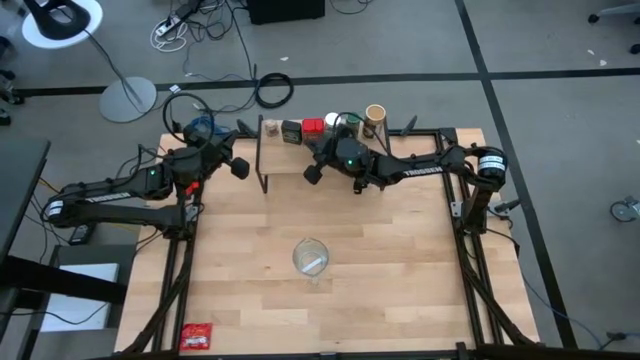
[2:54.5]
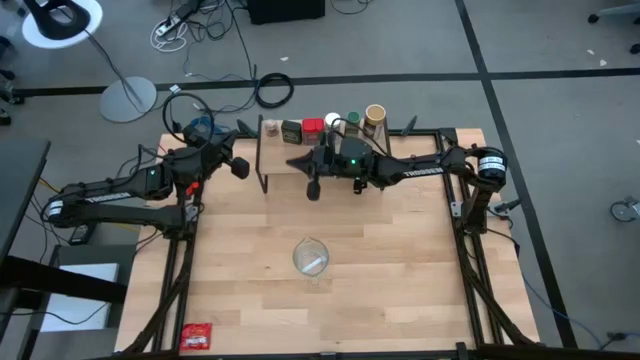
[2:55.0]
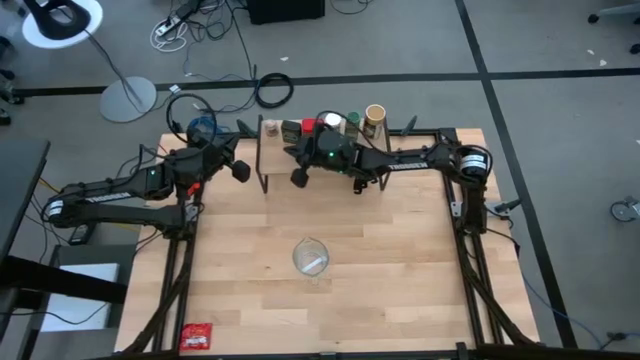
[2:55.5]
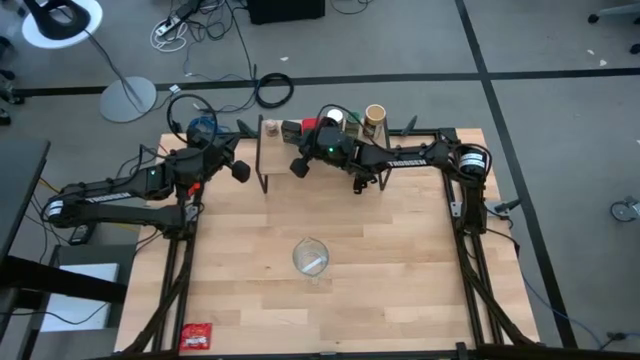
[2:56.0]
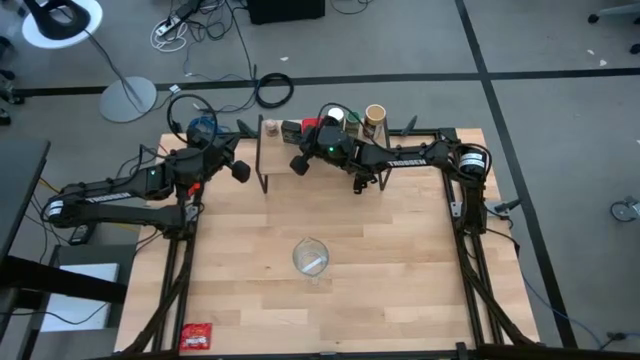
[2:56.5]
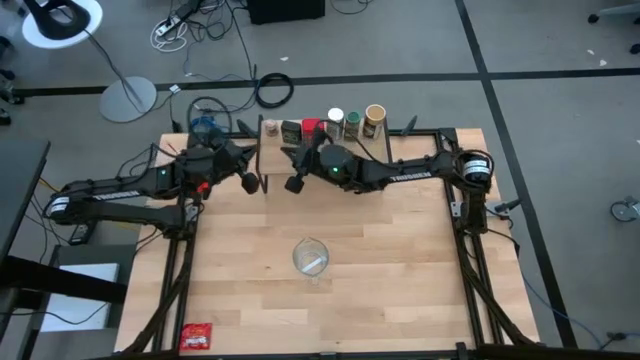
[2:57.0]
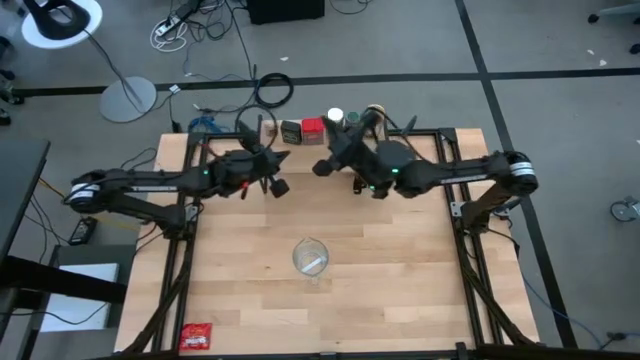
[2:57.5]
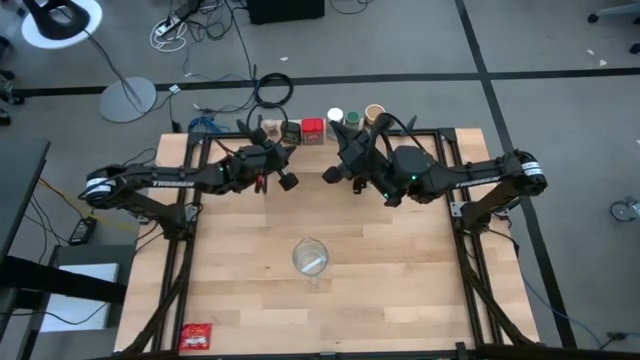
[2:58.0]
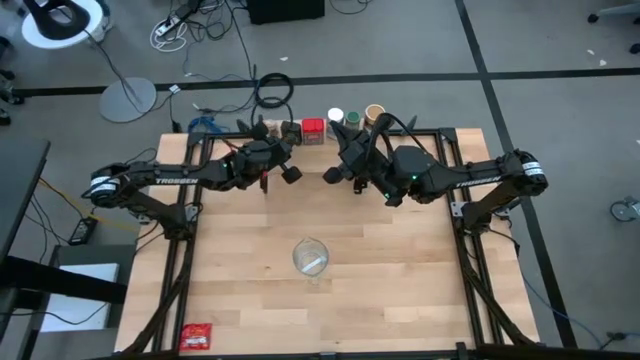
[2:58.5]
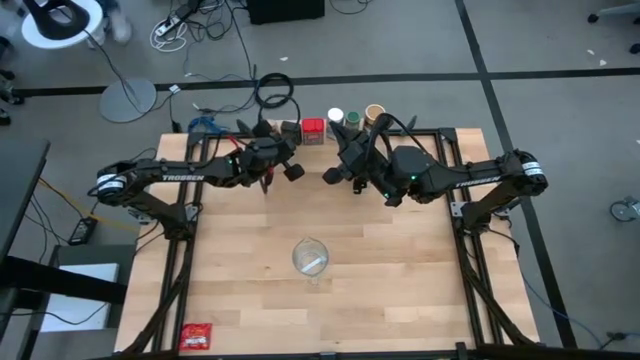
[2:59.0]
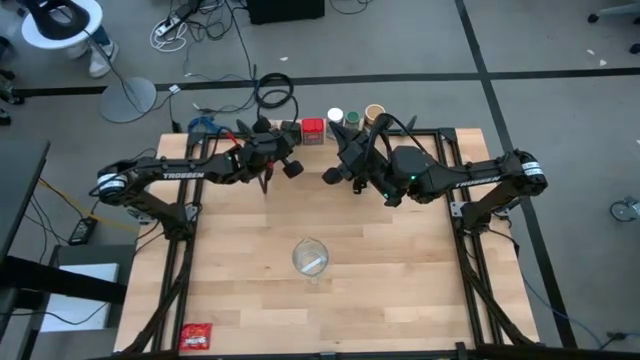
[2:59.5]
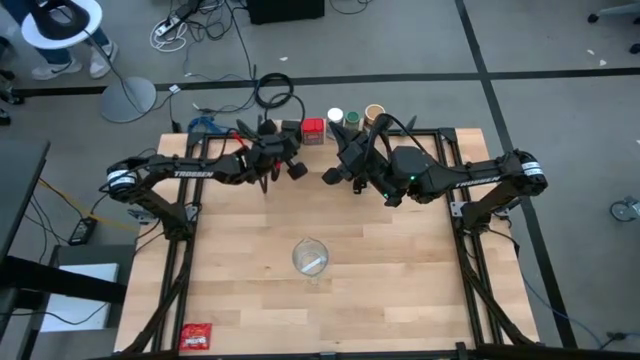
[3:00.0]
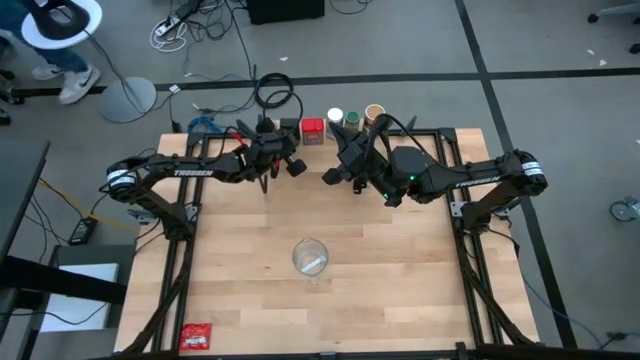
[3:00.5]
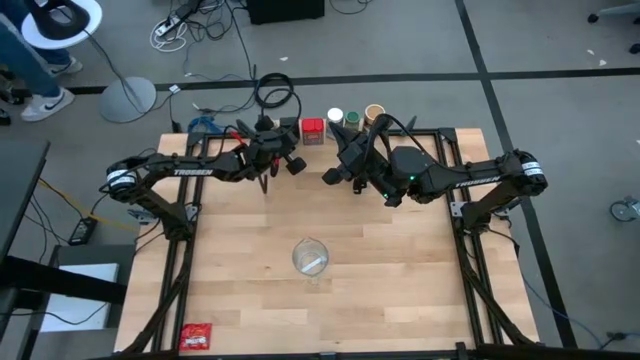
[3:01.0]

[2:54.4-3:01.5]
Task: Shelf spices
Adjust the black seasoning can on the shelf

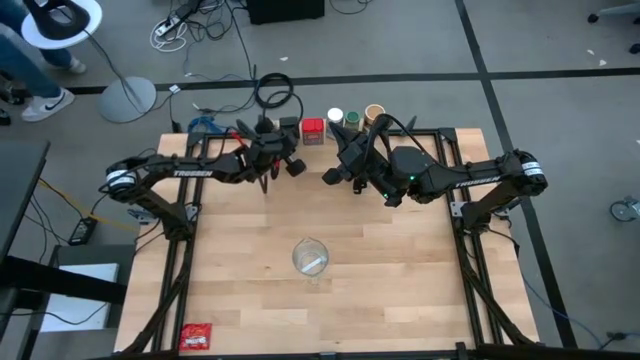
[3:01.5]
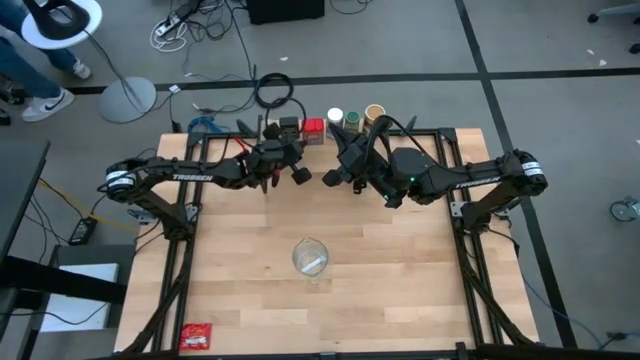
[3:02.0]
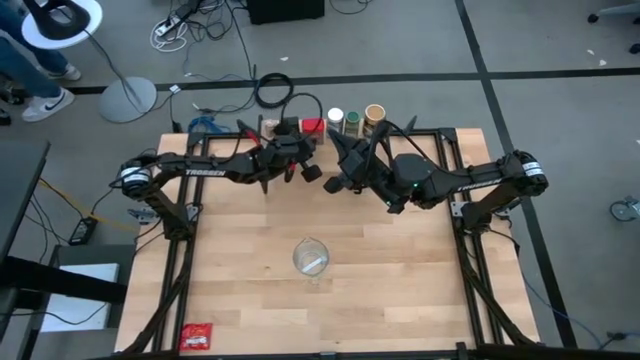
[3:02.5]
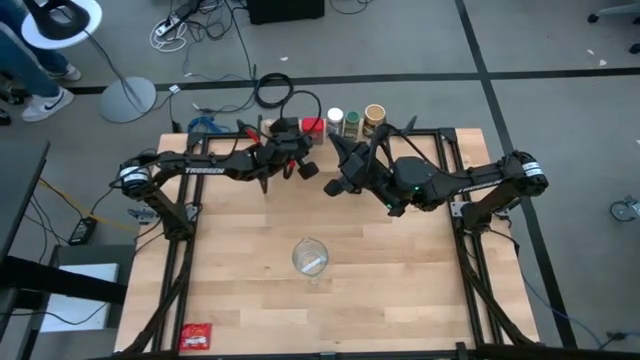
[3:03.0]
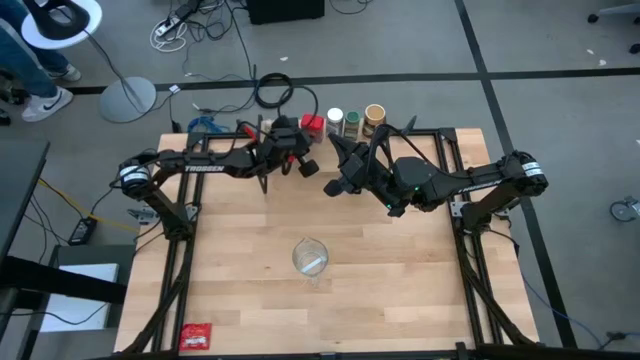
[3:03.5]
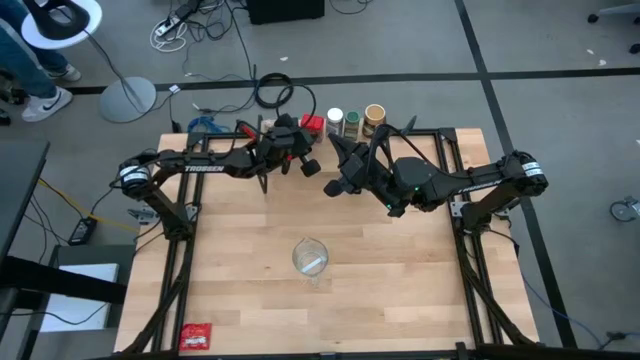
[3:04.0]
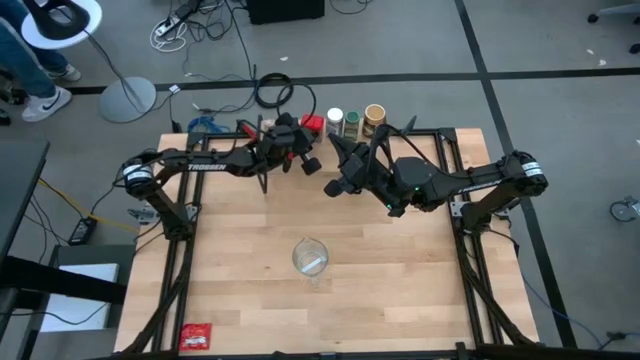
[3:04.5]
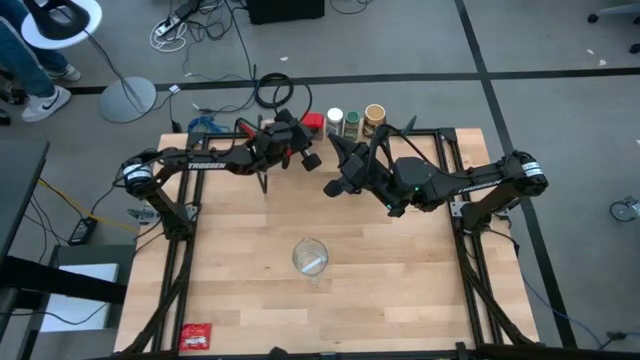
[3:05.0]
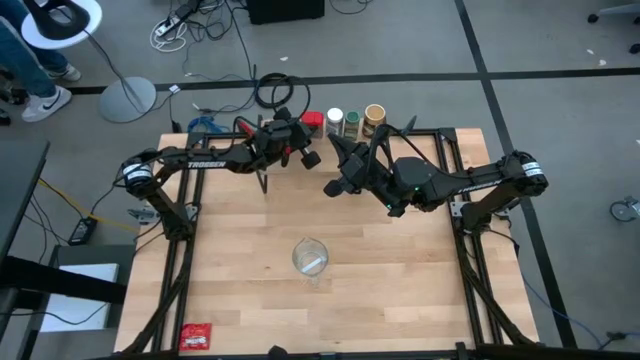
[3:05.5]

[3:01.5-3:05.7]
Adjust the red seasoning can on the shelf

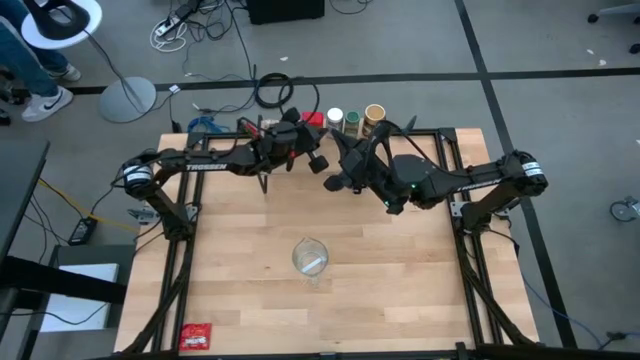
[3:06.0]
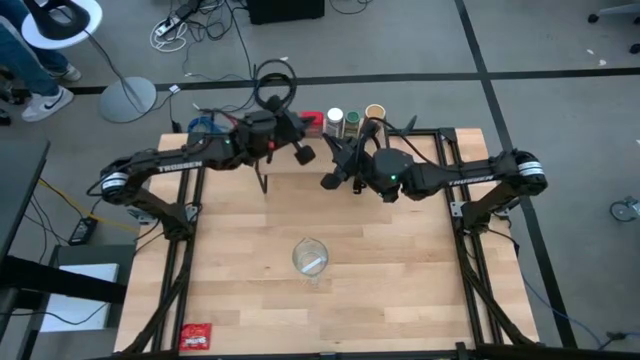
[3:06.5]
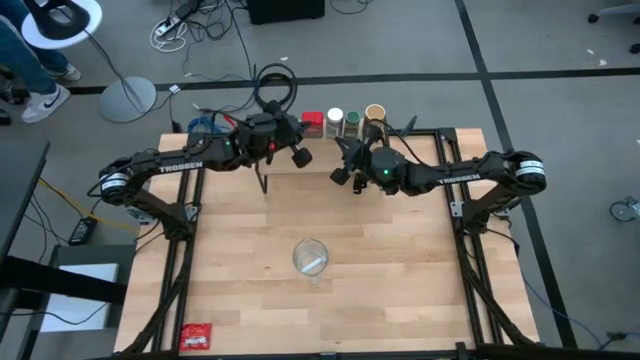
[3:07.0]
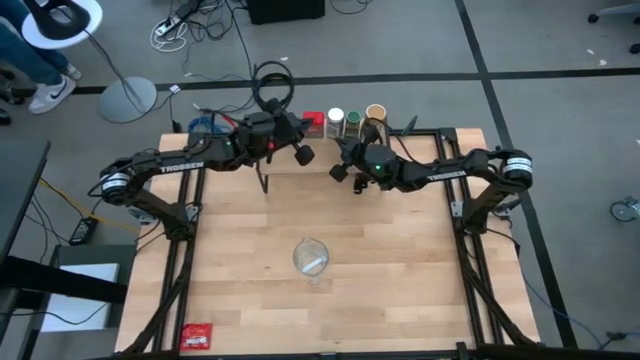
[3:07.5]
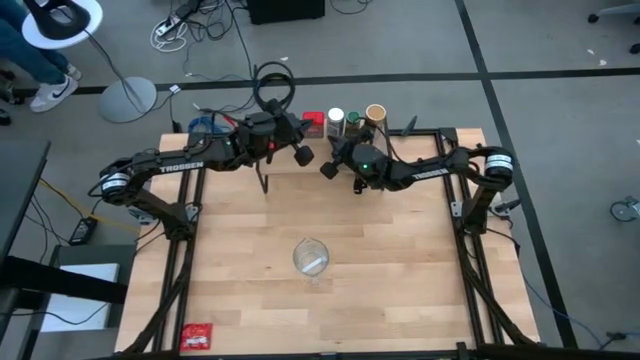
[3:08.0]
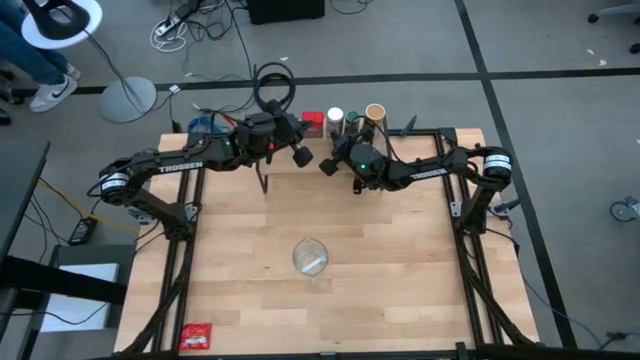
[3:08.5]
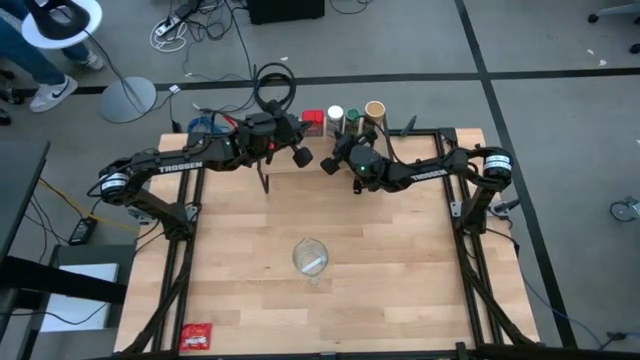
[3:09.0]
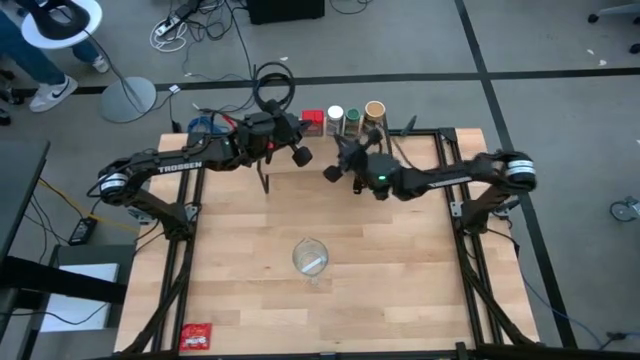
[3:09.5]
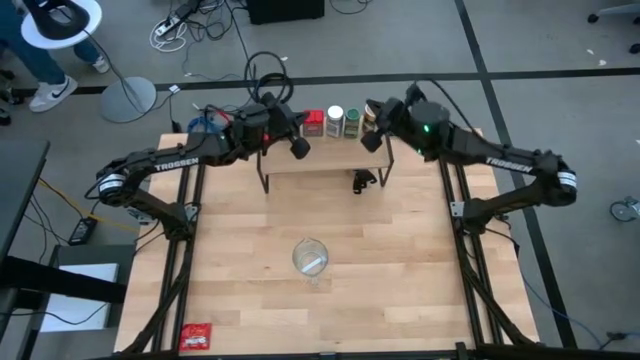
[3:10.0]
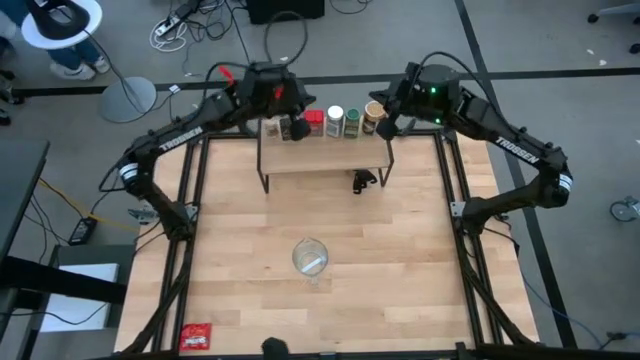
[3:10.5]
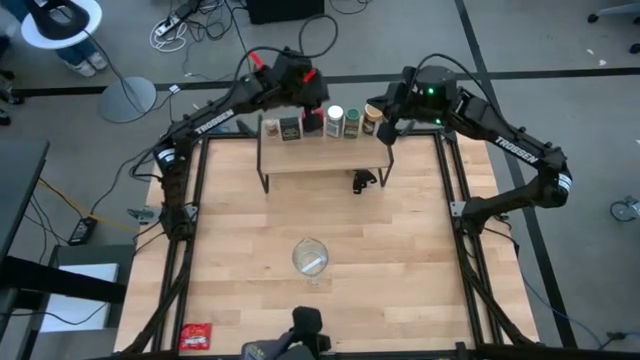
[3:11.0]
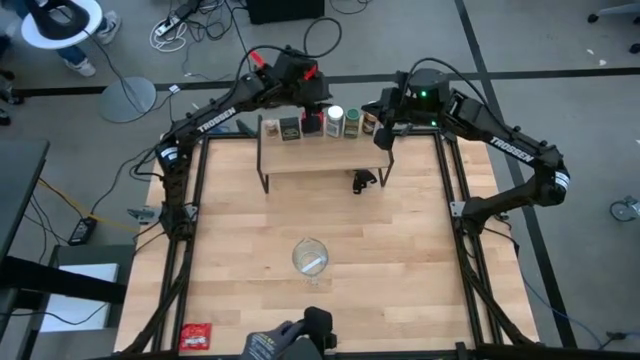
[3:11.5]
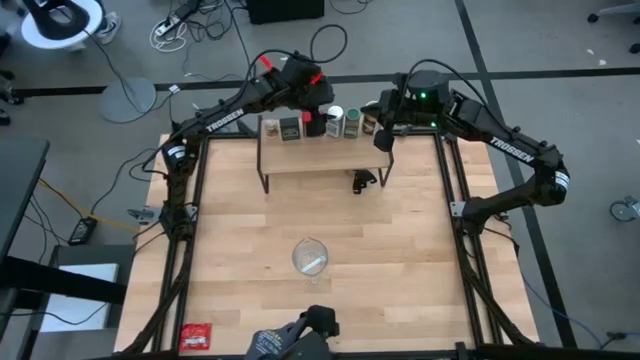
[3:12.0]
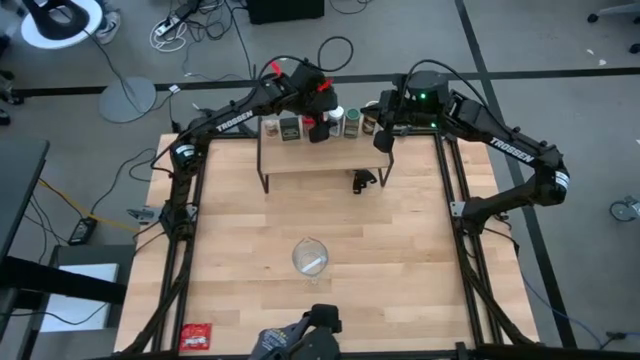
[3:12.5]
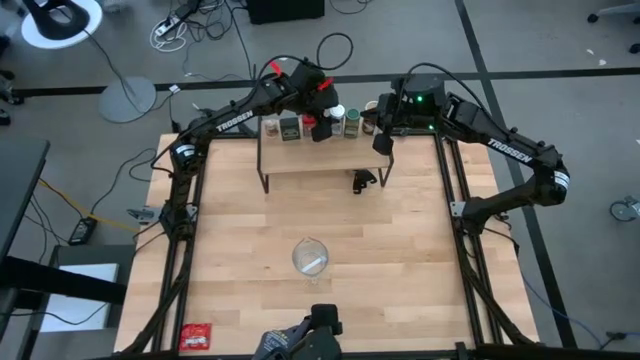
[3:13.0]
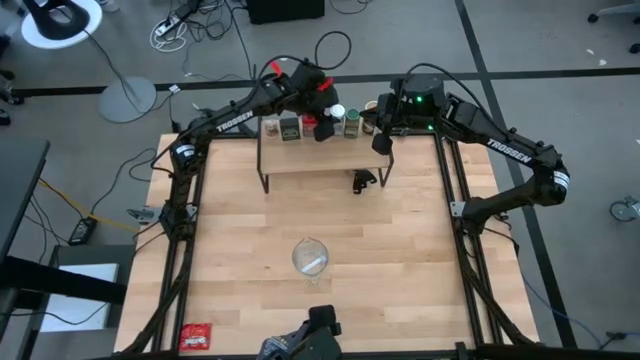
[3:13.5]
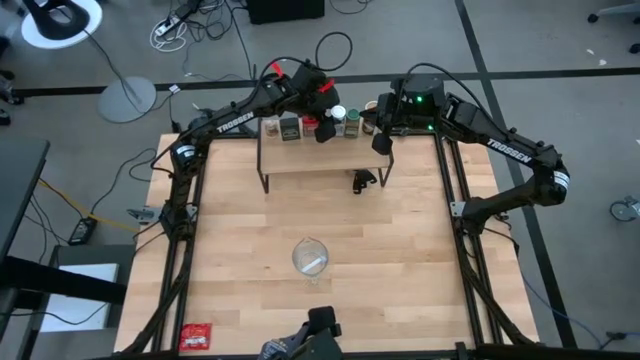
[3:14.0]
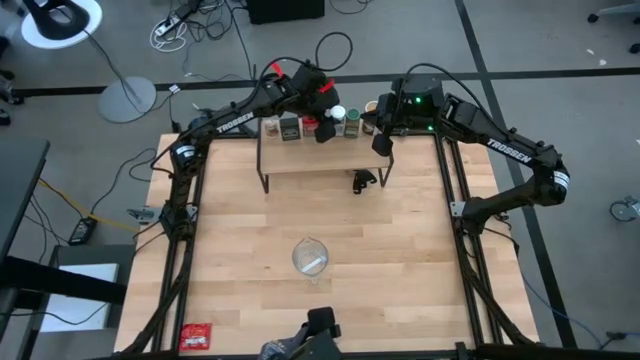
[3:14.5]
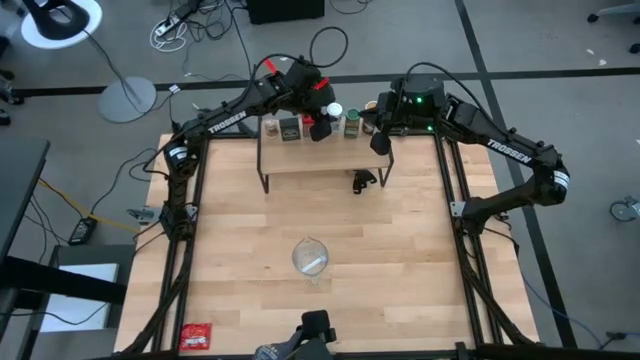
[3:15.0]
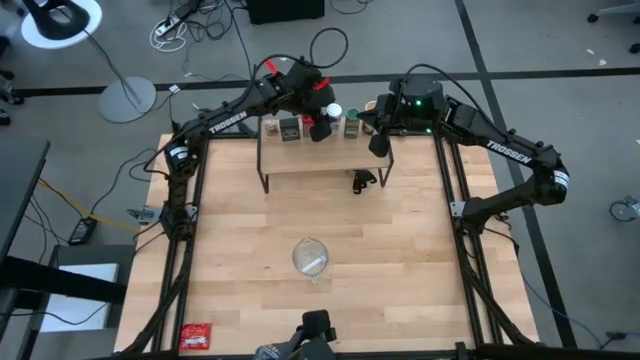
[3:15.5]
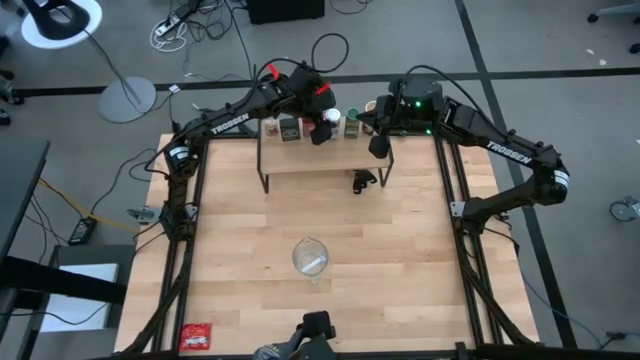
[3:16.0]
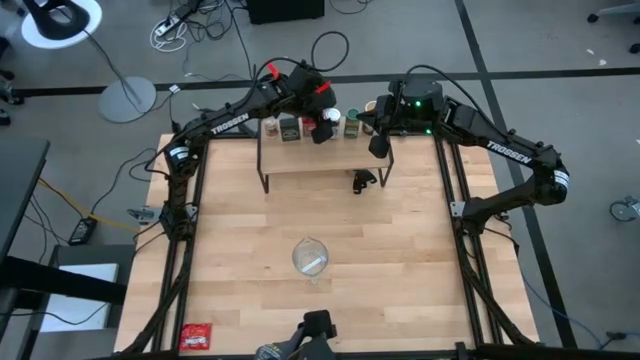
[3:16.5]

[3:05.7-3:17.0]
Adjust the white seasoning bottle on the shelf
